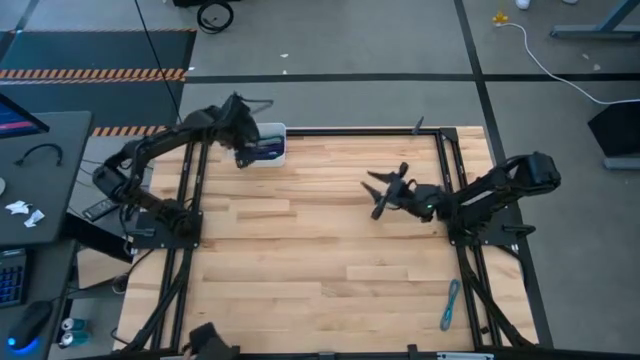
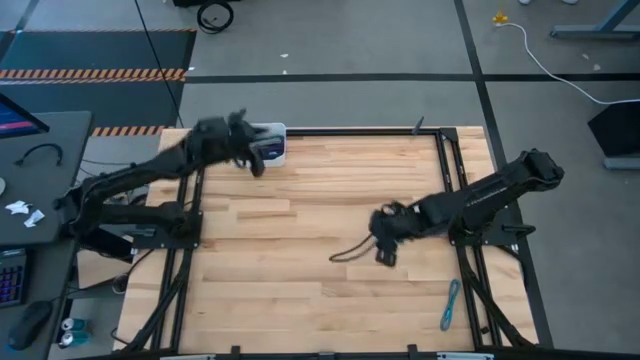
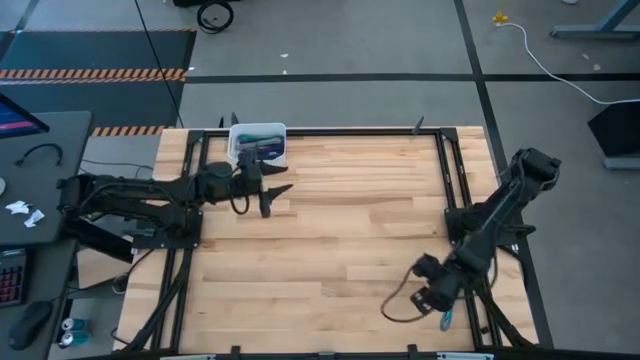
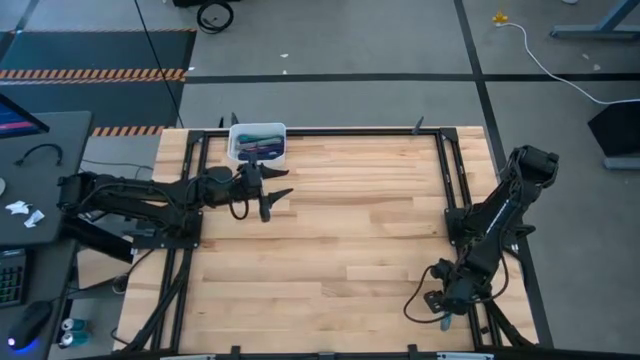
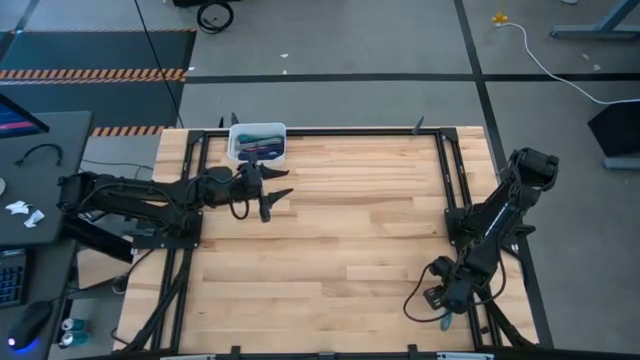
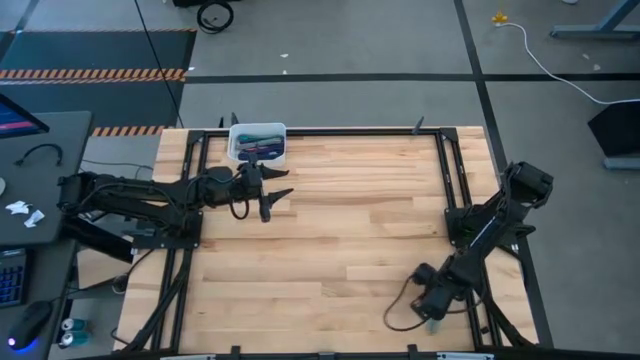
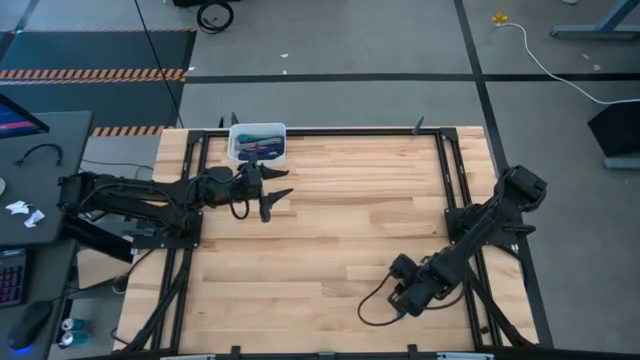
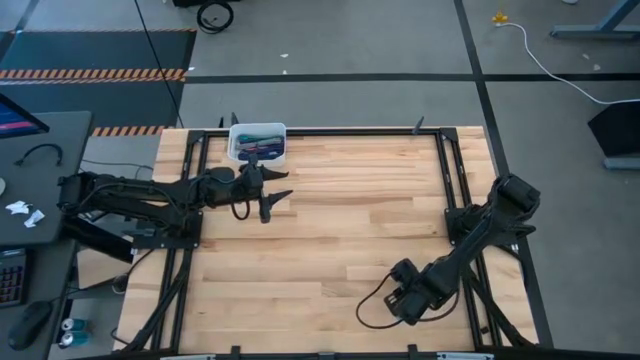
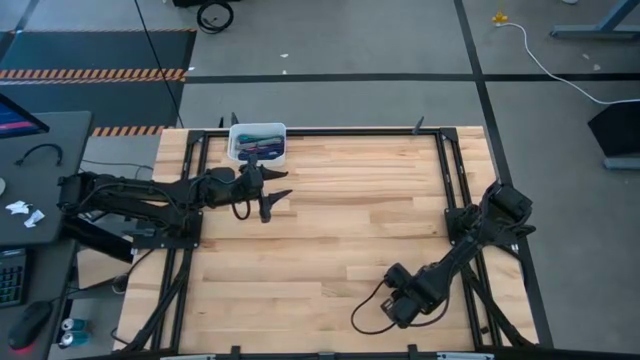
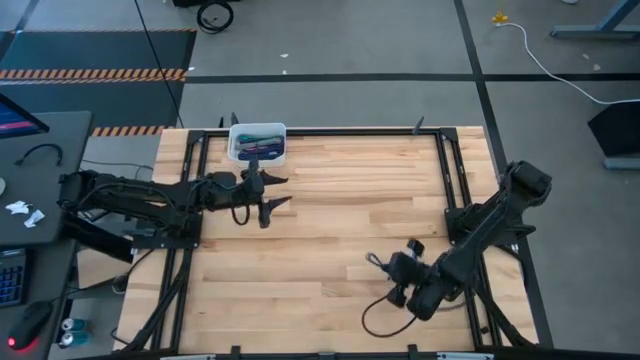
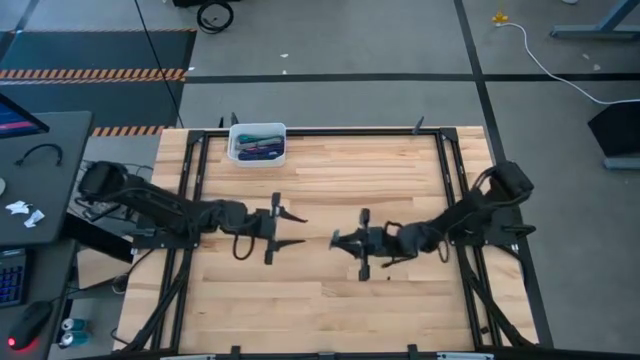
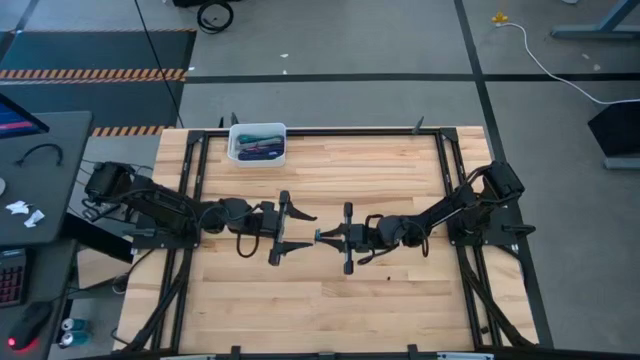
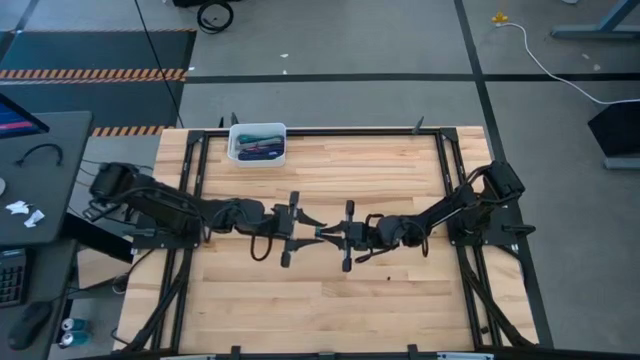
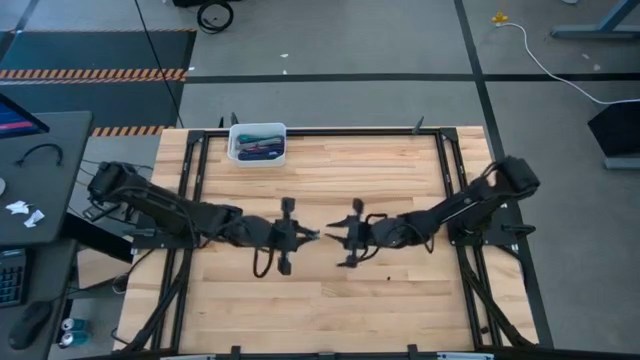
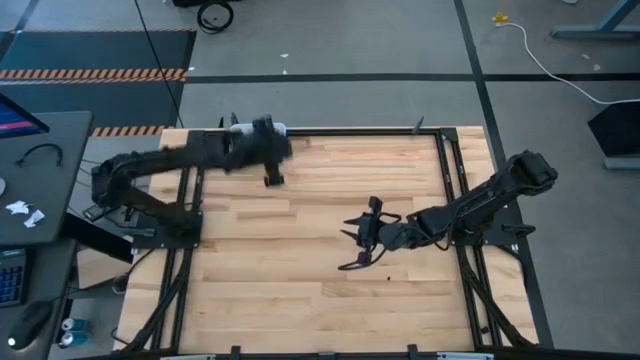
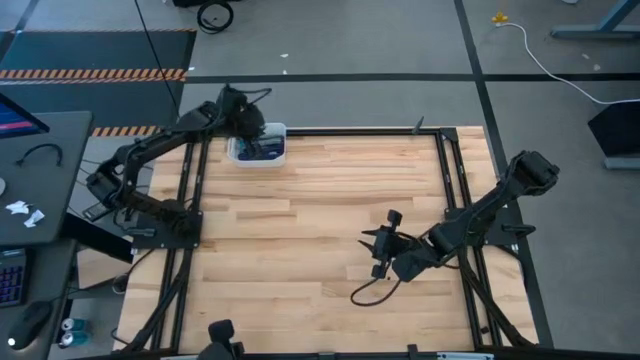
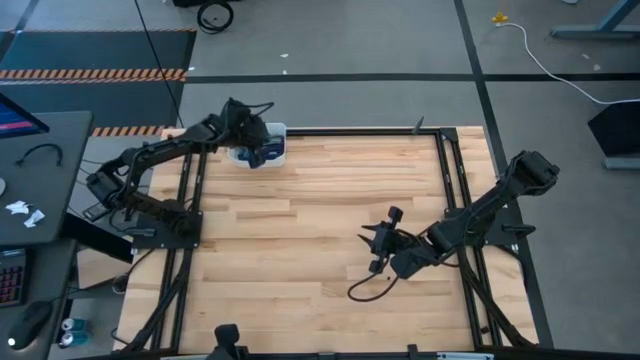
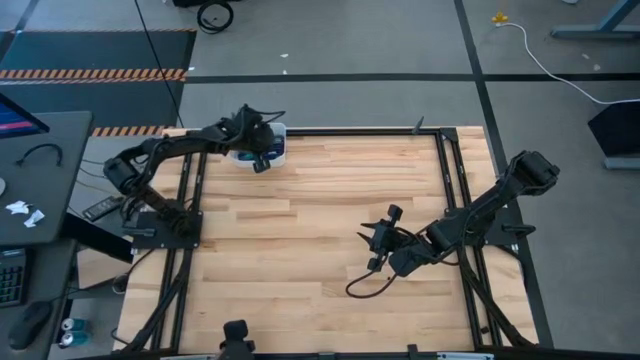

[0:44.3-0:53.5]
Task: Pick and place USB-C Cables
Put the light blue USB cable into the white bin

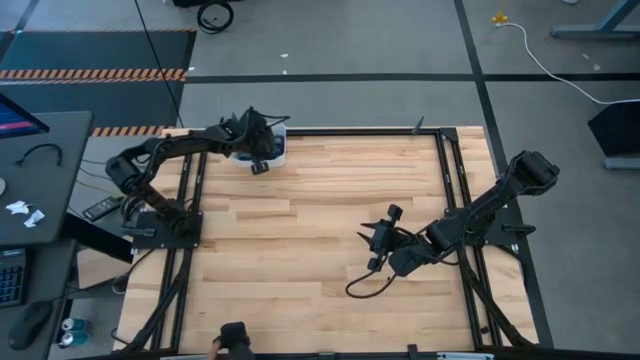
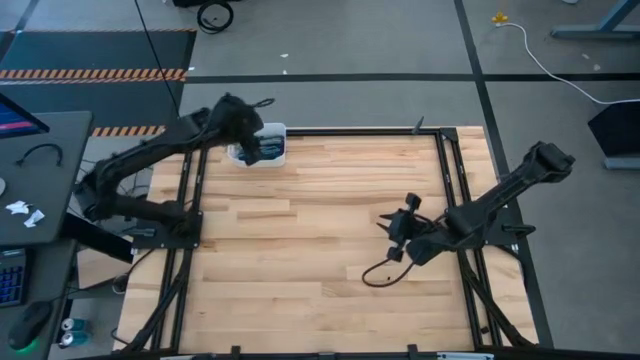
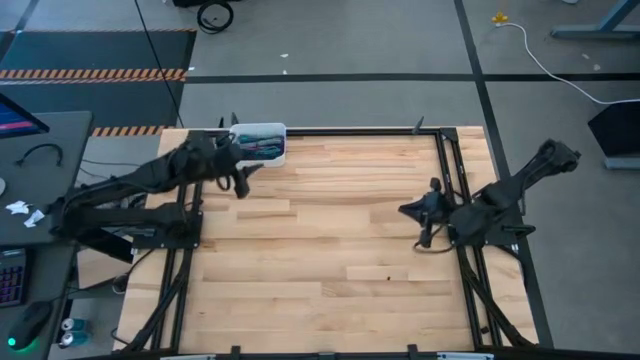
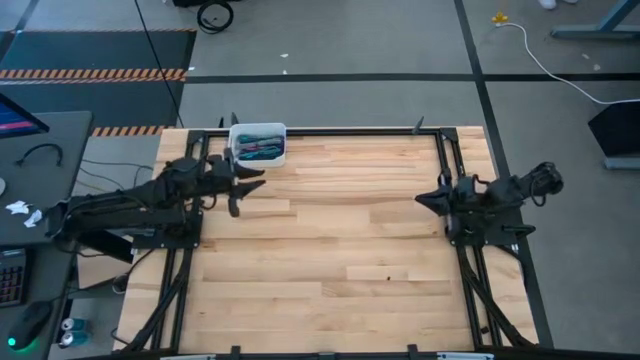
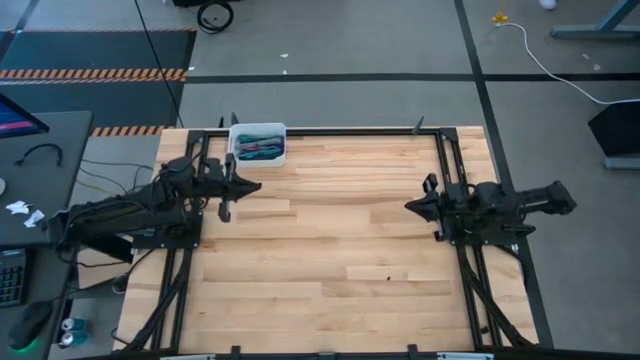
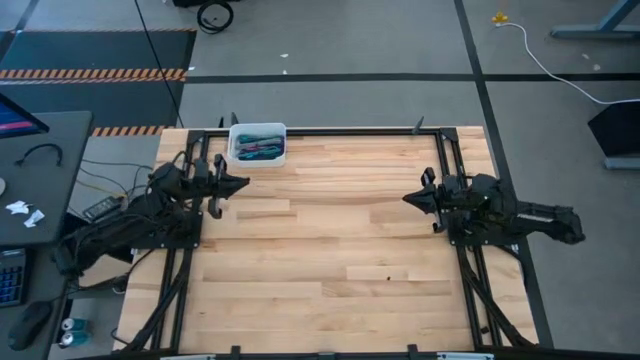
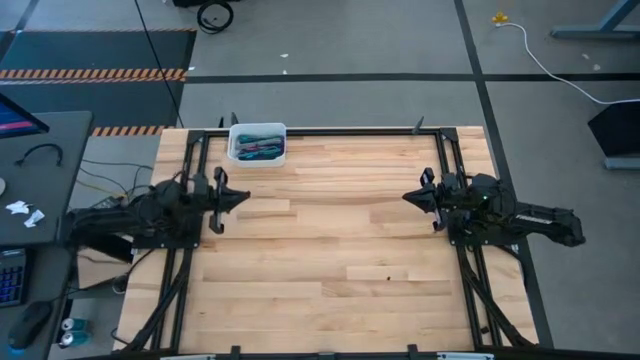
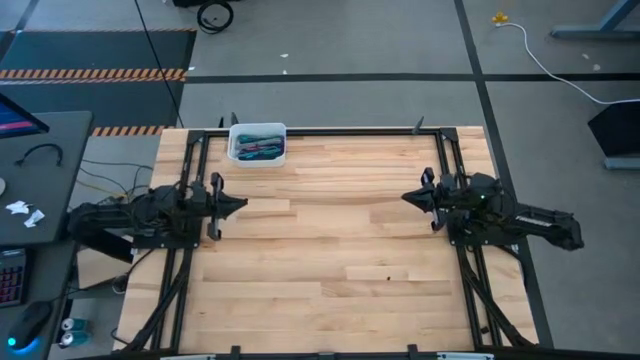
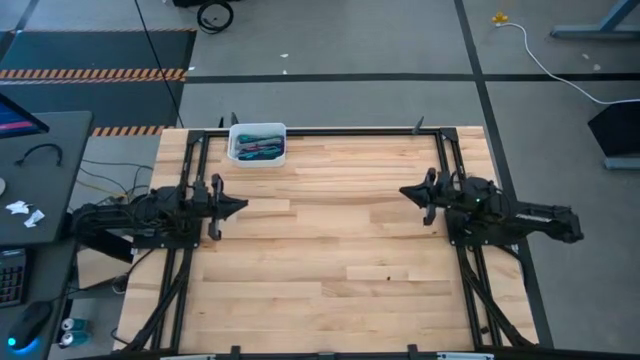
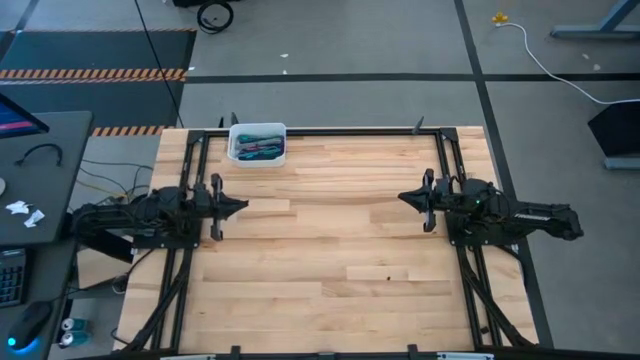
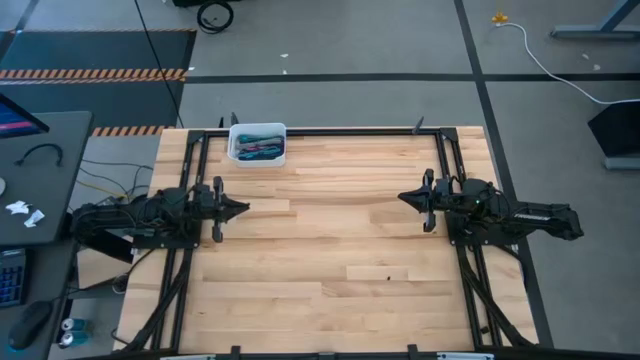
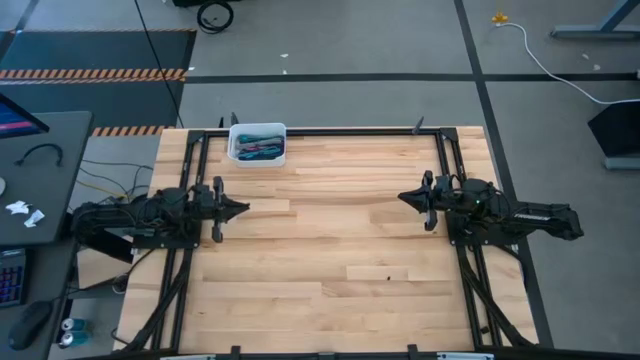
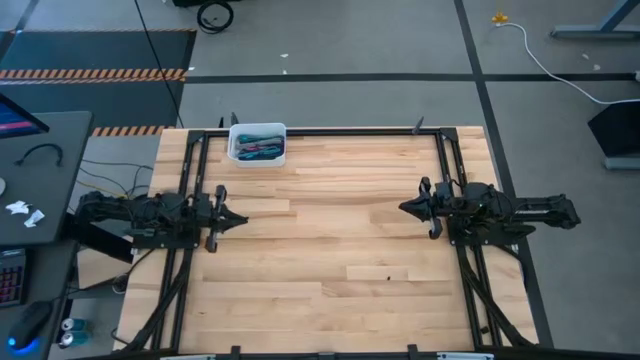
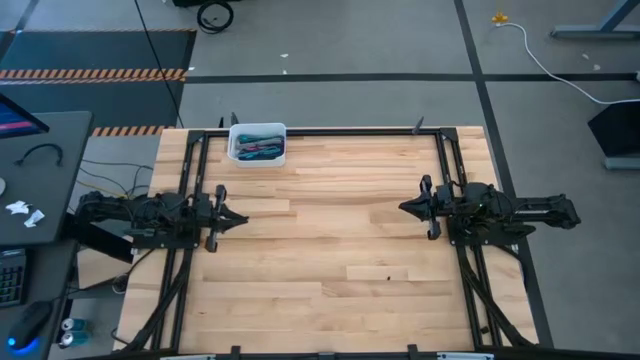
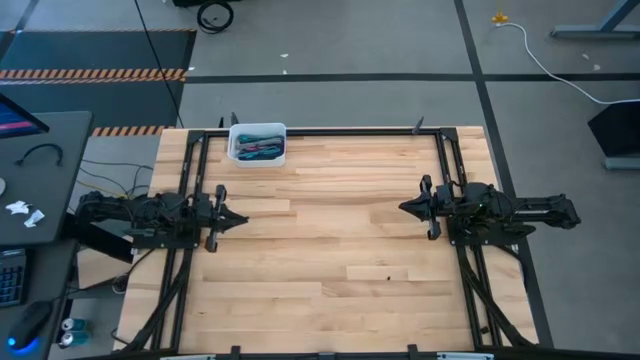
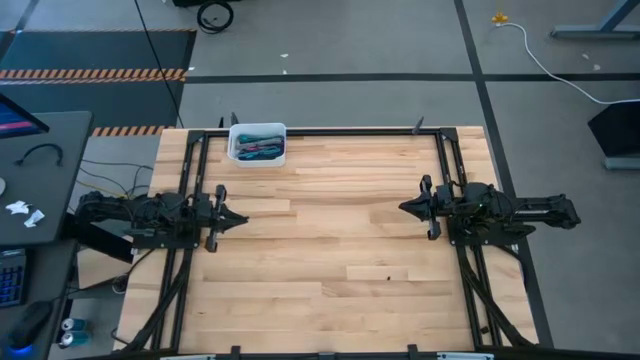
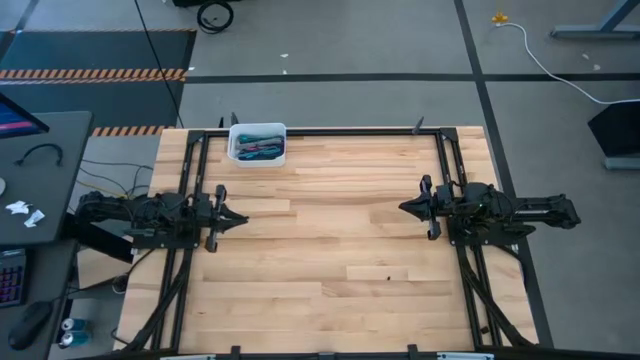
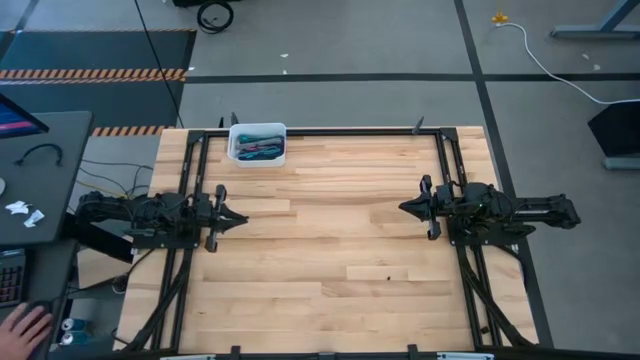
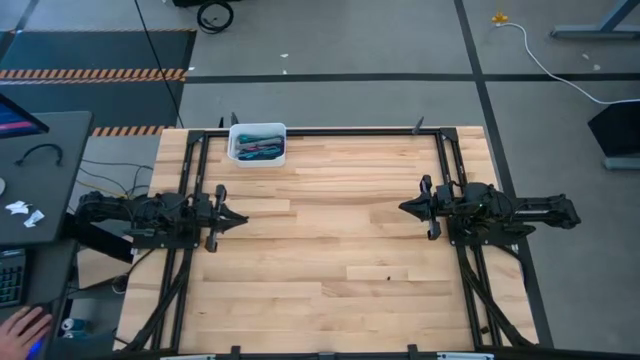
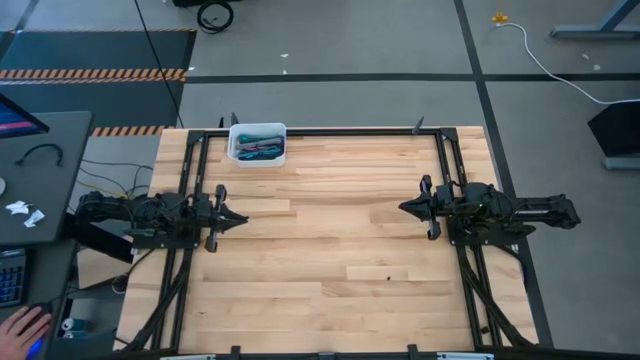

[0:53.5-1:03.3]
Return to Home Position

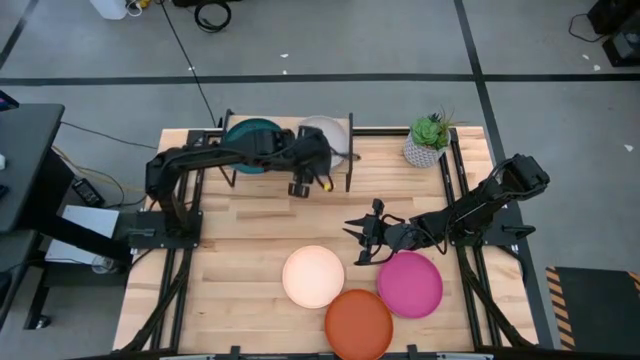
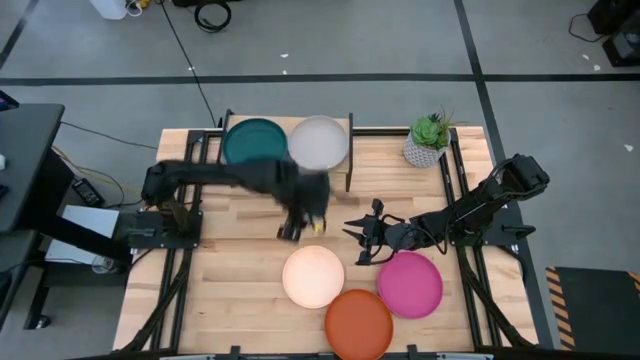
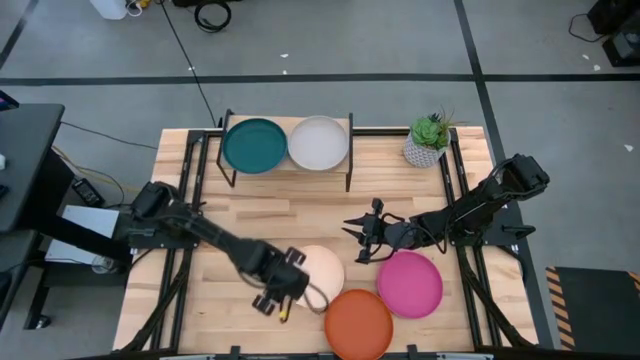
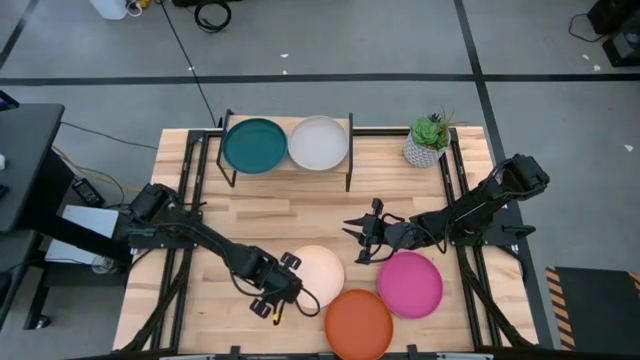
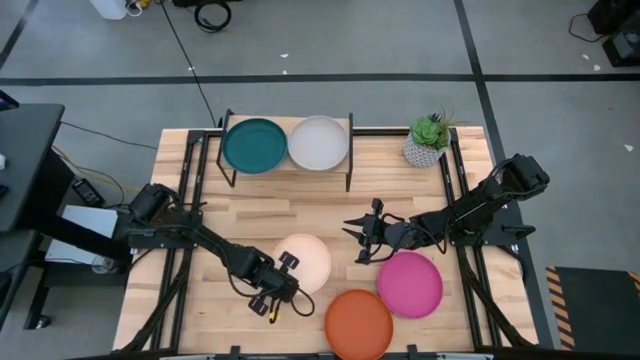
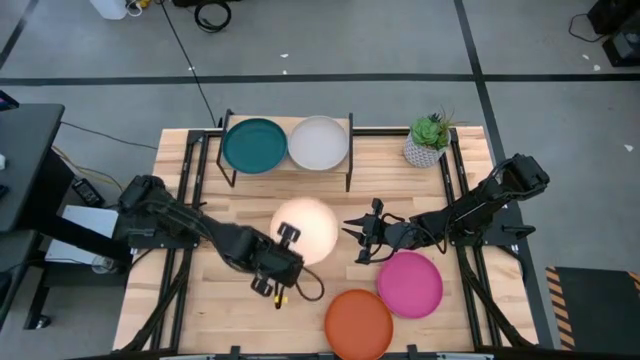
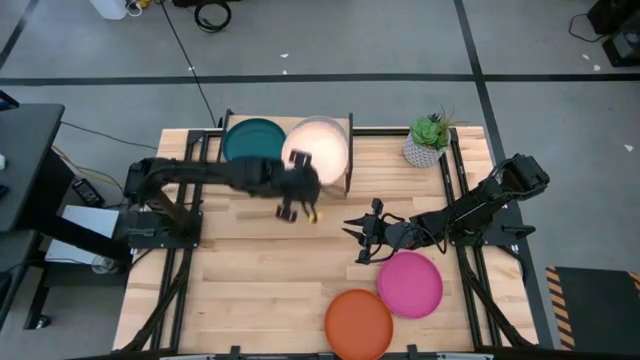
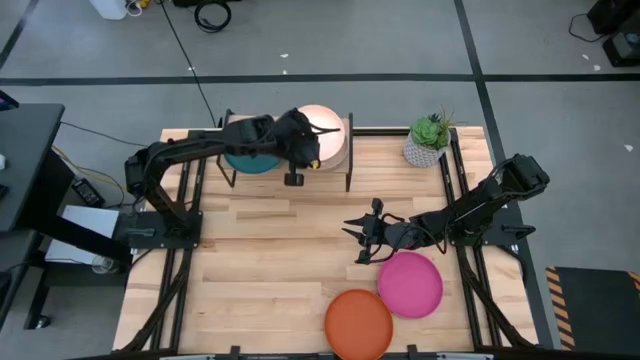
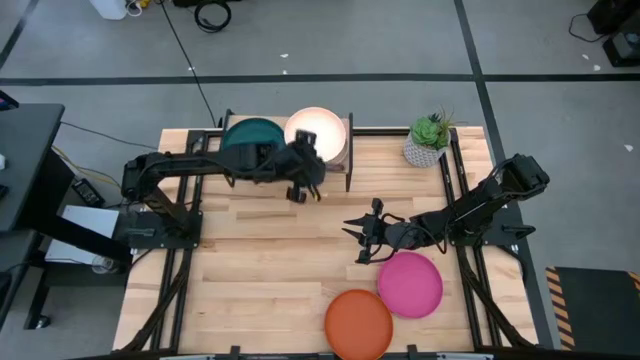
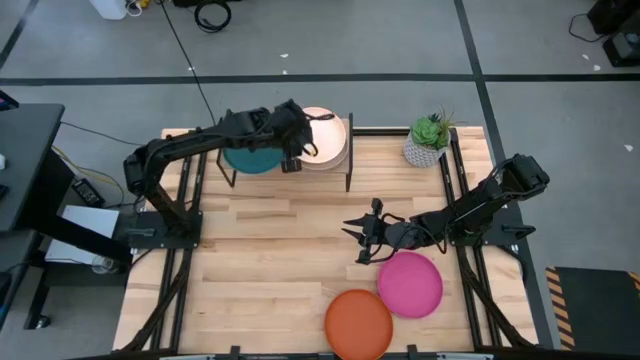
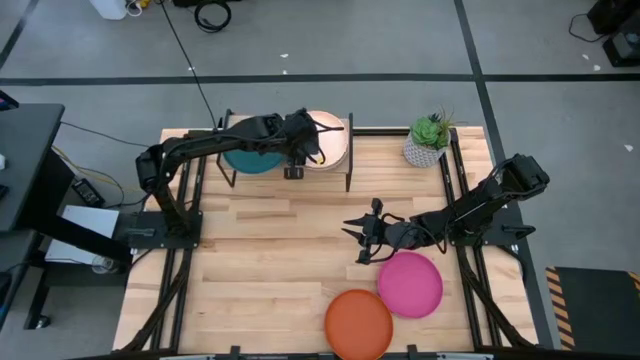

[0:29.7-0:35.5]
Task: Place and stack plates onto a shelf
Stack the light orange plate on top of the gray plate on the shelf
